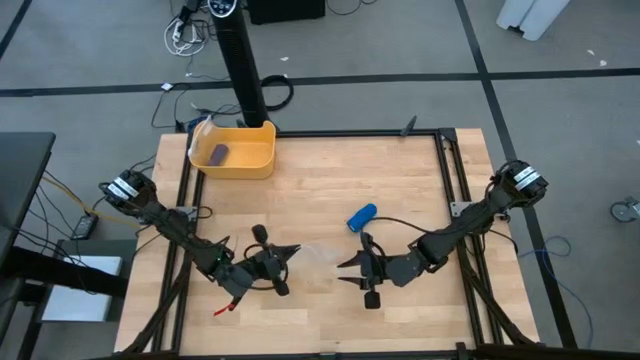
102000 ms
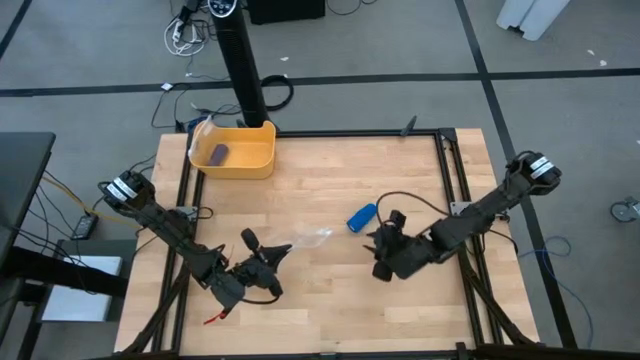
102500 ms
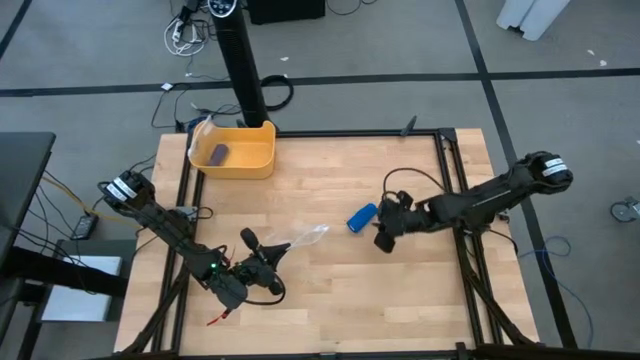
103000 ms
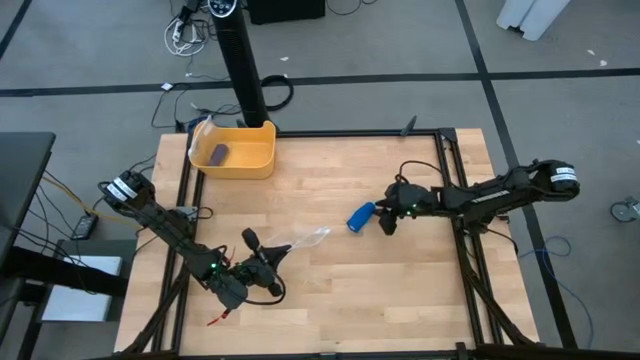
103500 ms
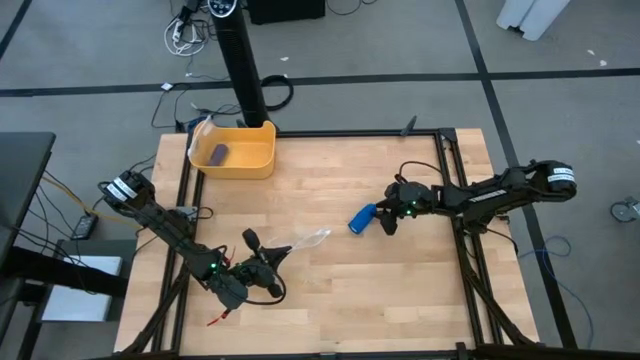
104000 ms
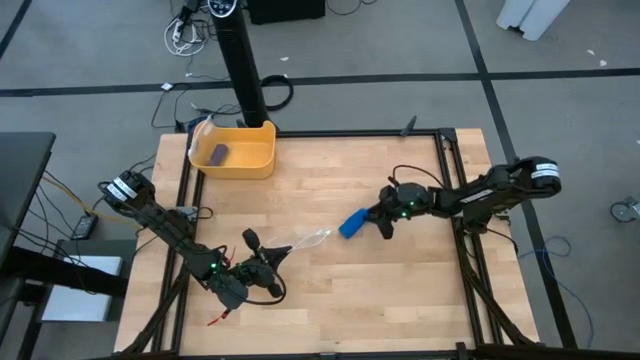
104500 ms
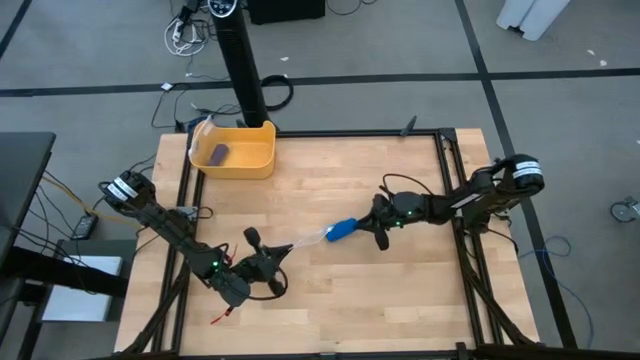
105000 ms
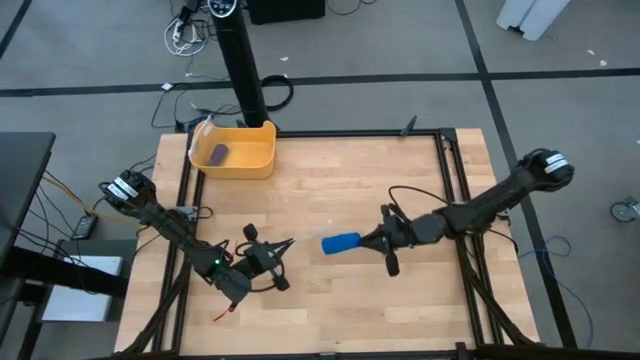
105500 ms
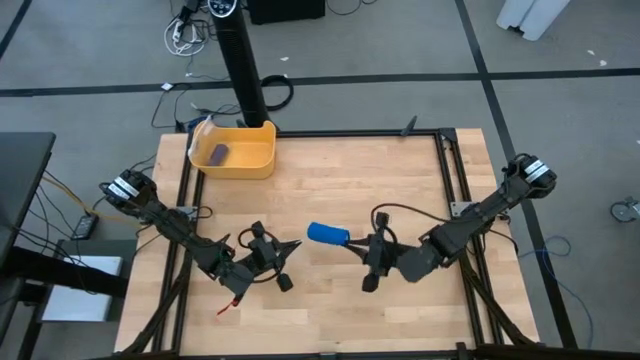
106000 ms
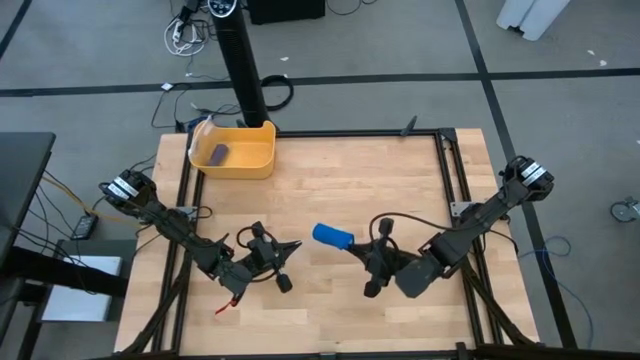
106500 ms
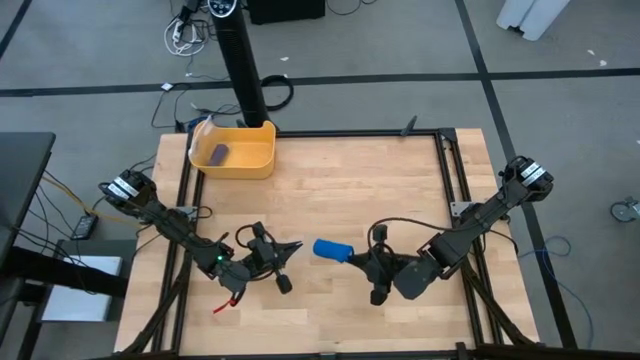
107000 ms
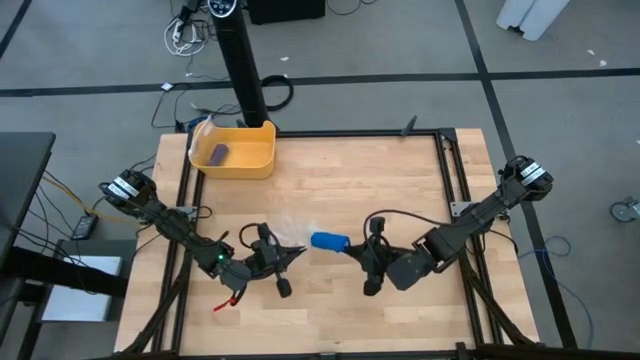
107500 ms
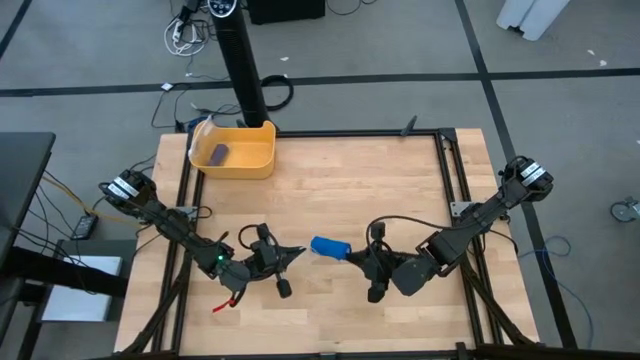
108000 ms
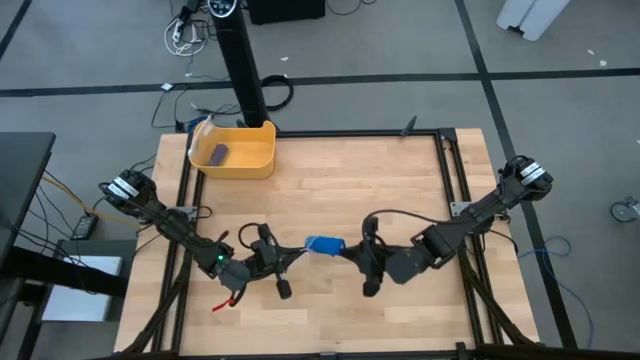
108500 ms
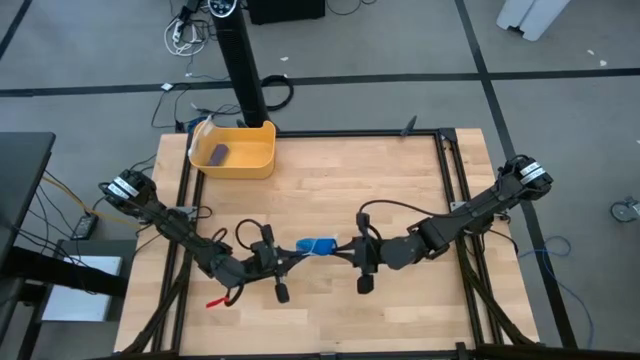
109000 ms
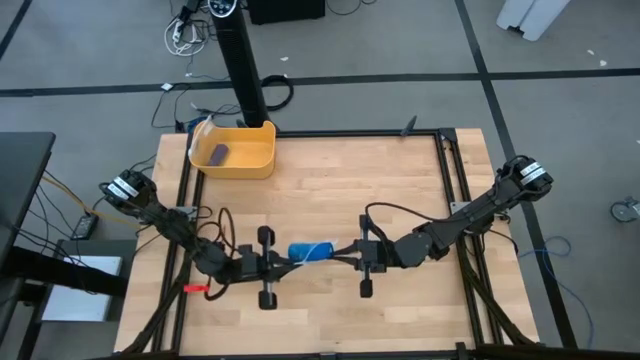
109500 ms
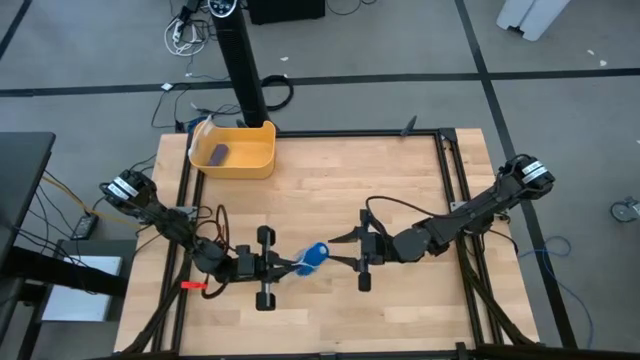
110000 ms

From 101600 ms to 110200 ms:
Task: Roll bandage
Put the rolled blue bandage into the transparent zip bag

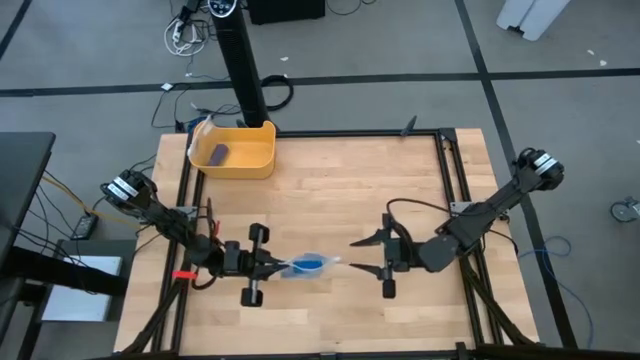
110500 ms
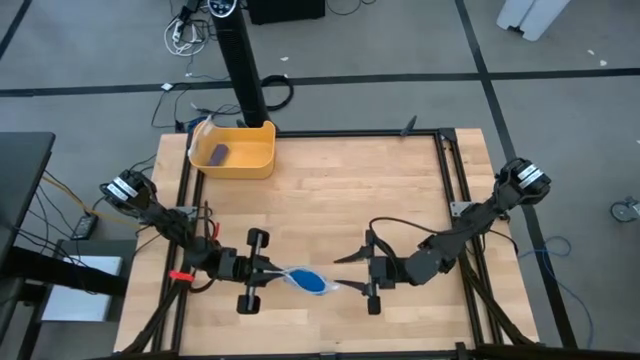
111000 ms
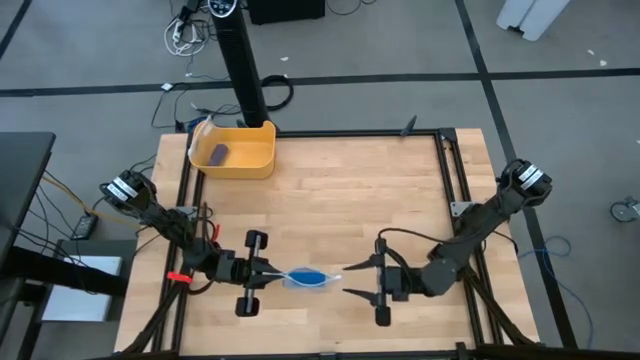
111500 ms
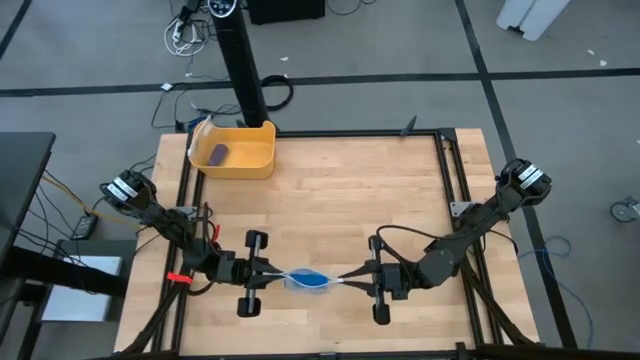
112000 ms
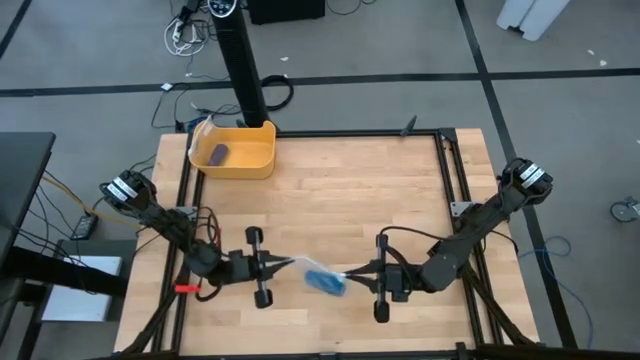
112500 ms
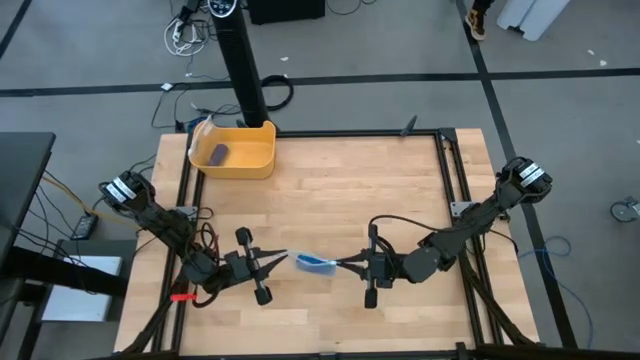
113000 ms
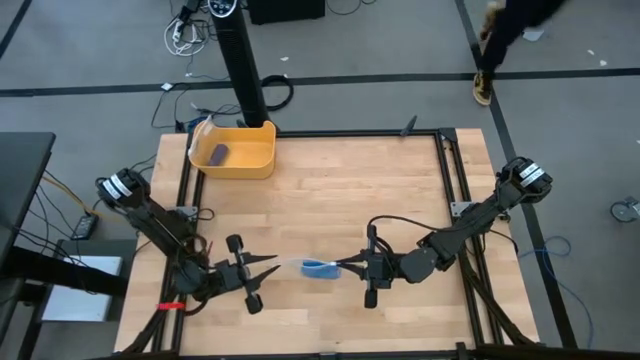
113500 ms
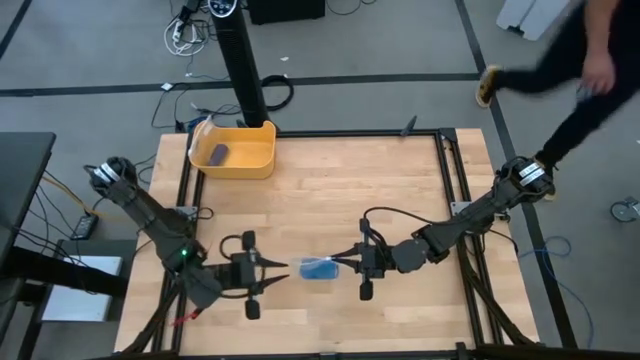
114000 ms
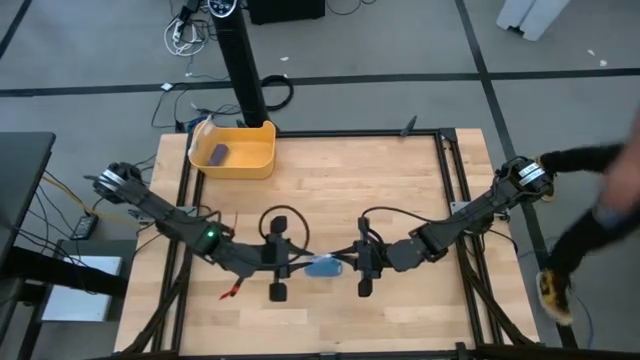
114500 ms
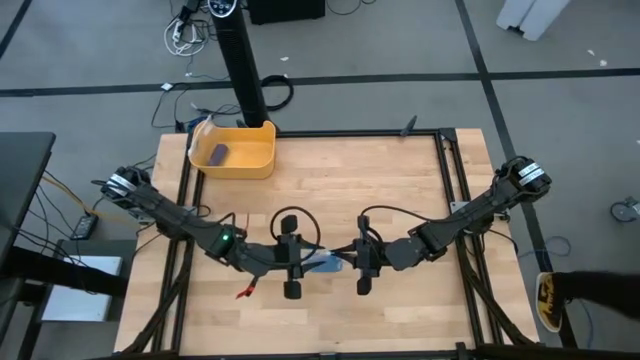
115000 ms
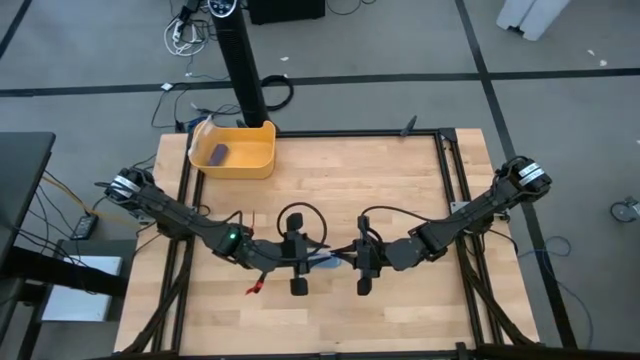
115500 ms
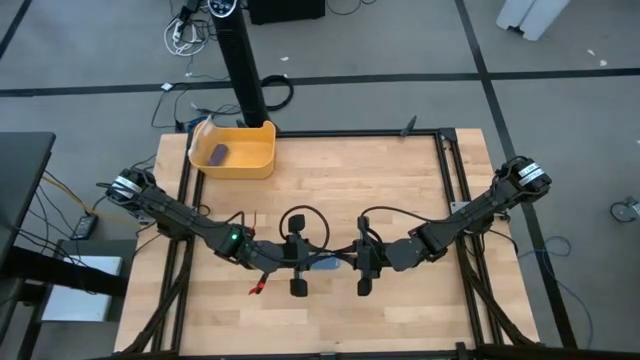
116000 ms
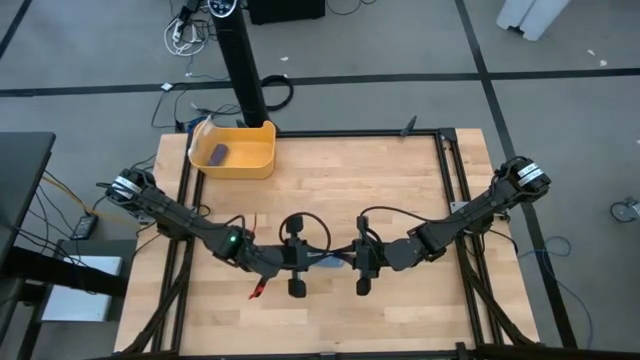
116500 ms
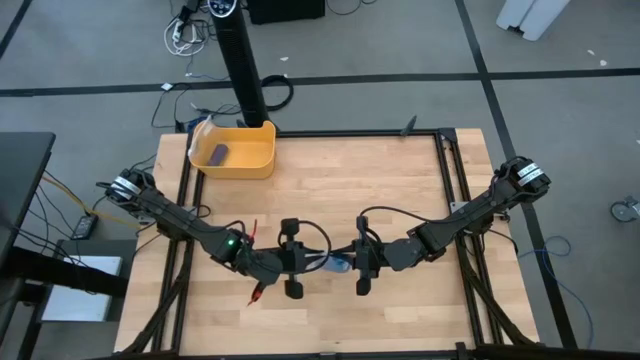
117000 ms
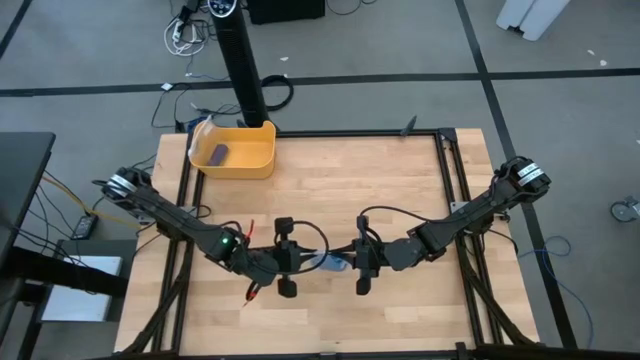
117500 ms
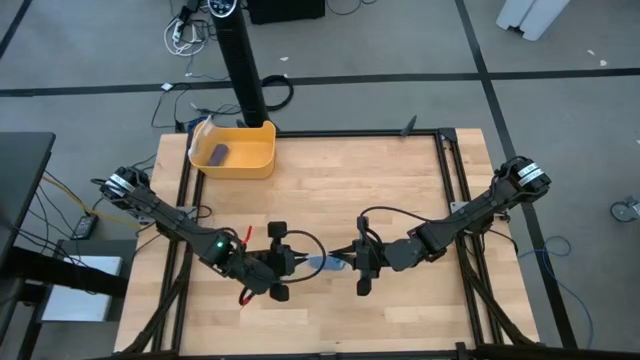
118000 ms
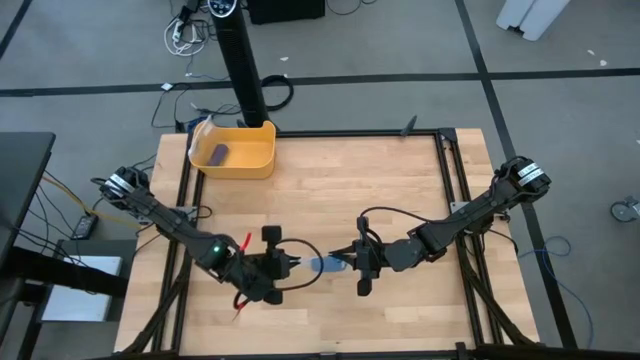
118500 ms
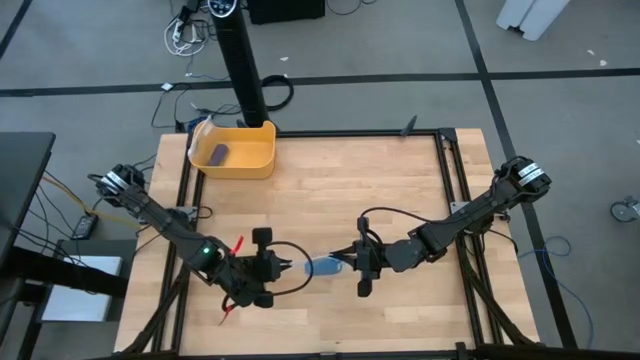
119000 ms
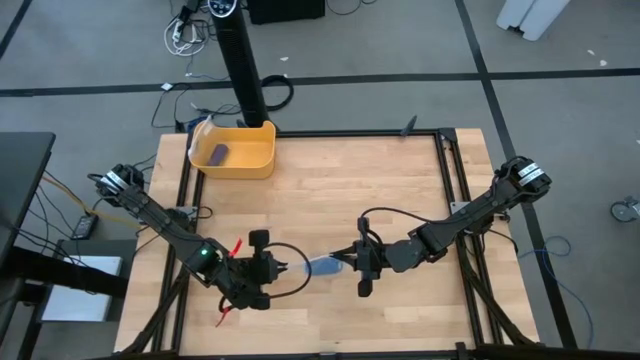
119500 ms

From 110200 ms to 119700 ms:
Close the transparent zip bag

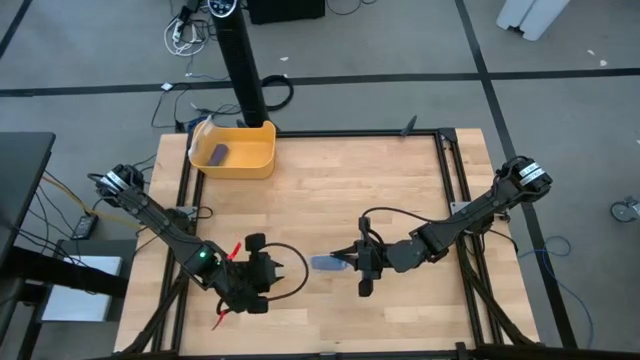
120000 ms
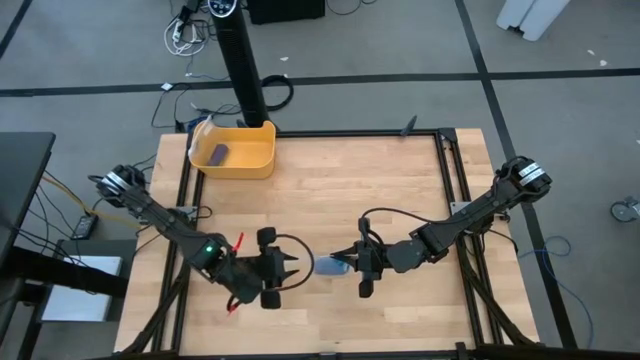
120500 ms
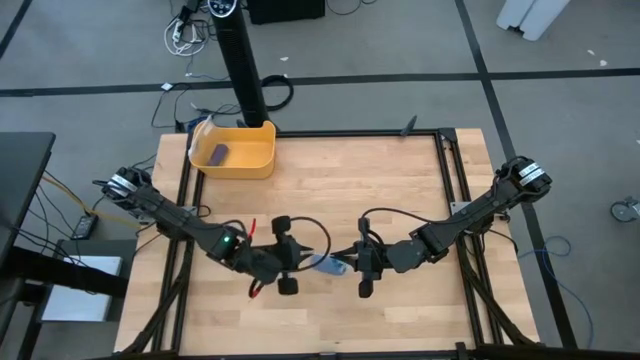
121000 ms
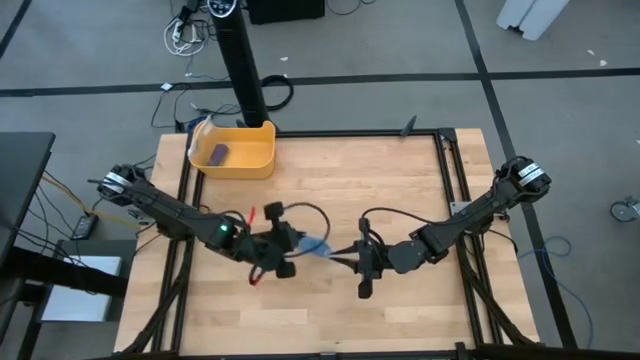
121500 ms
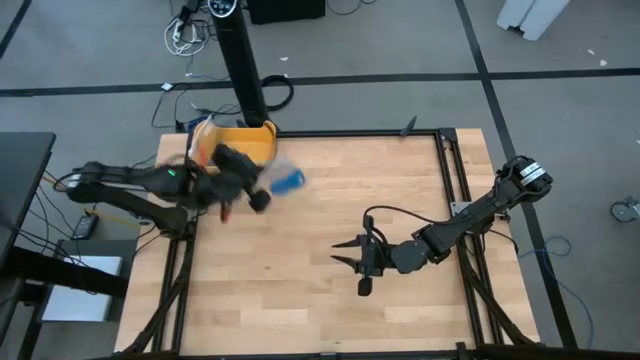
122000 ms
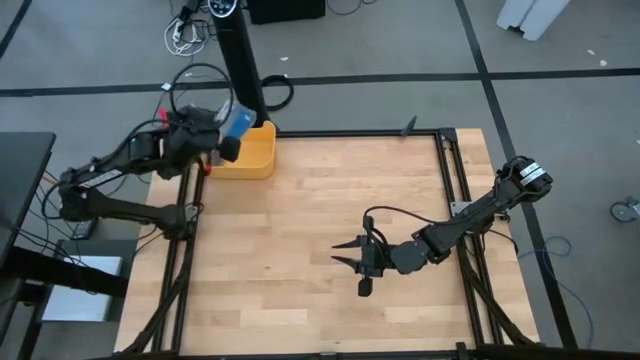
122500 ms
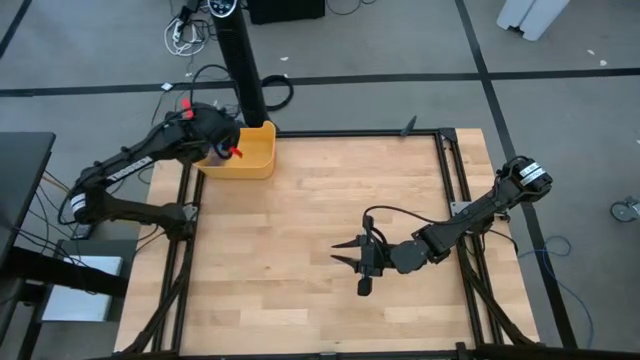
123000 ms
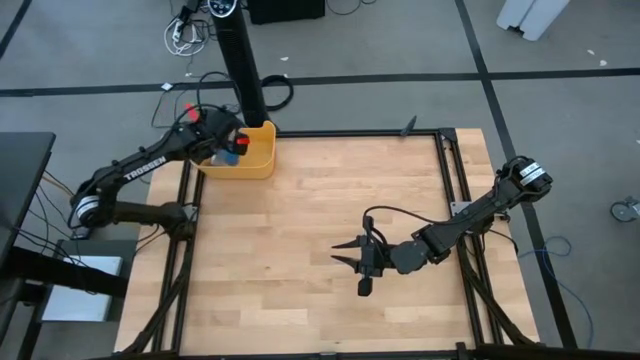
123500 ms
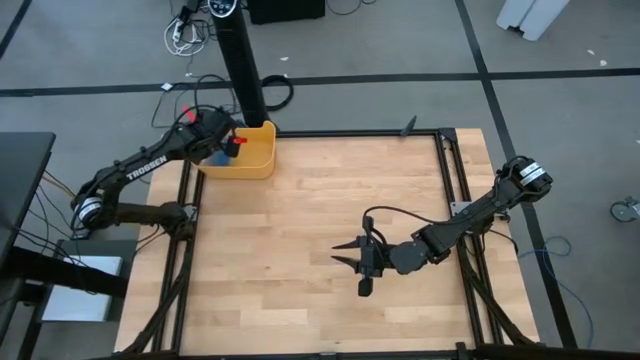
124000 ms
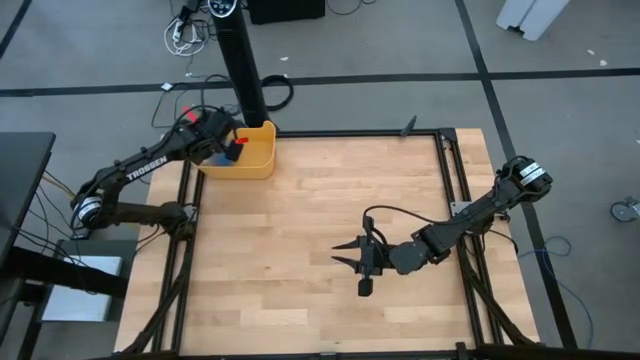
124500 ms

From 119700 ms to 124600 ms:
Put the transparent zip bag with the rolled blue bandage into the yellow bin
